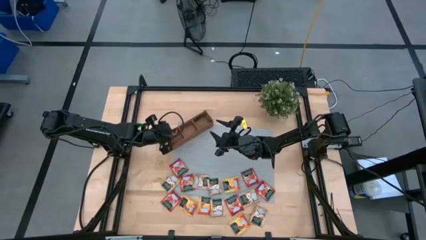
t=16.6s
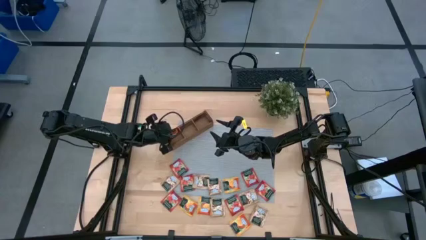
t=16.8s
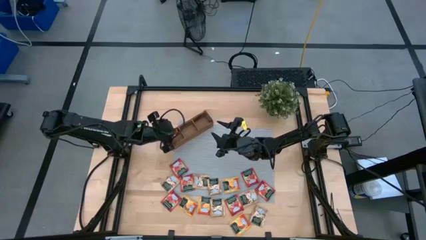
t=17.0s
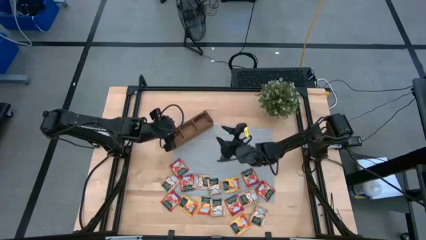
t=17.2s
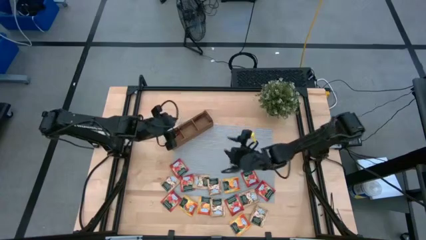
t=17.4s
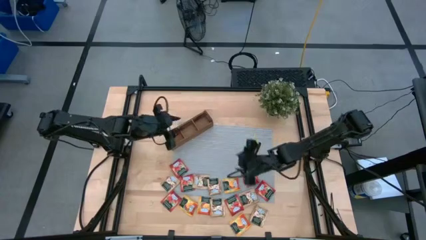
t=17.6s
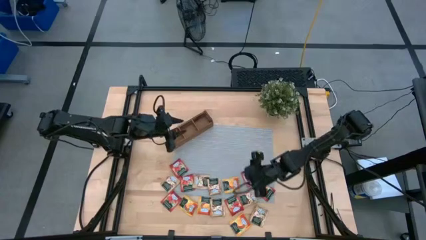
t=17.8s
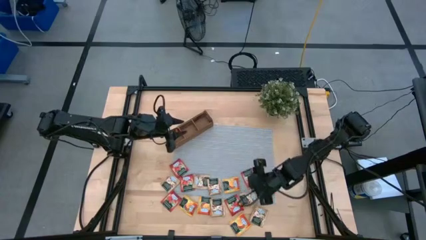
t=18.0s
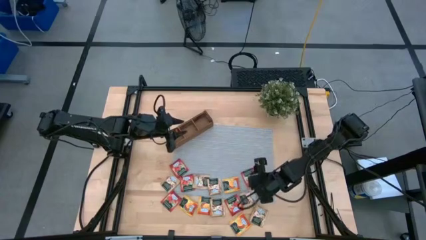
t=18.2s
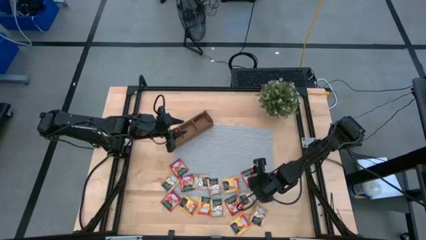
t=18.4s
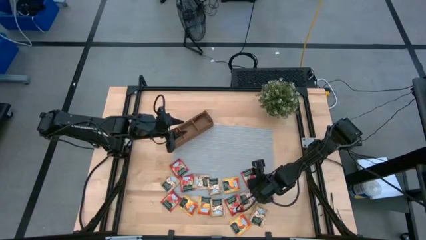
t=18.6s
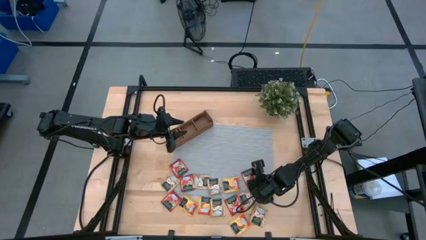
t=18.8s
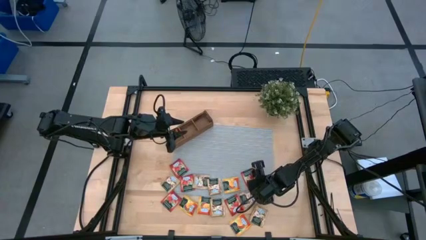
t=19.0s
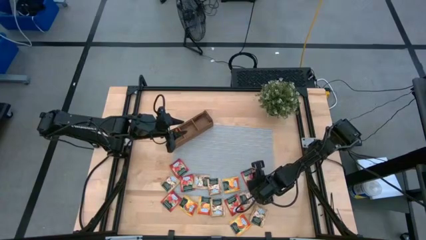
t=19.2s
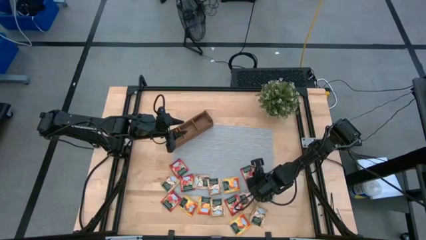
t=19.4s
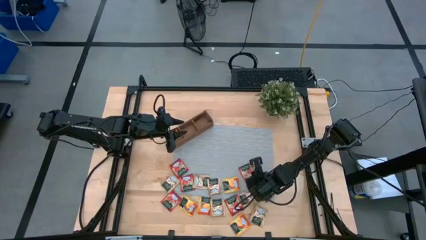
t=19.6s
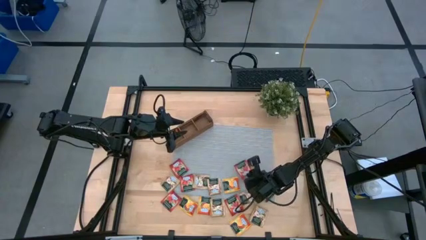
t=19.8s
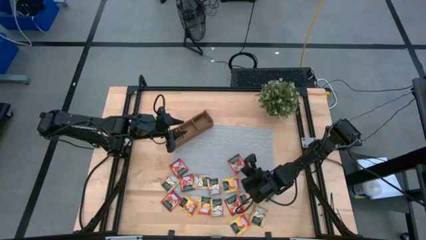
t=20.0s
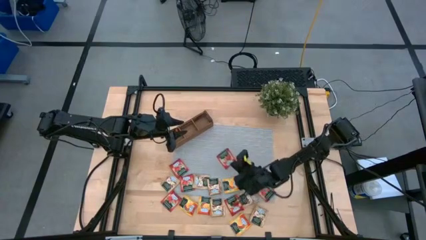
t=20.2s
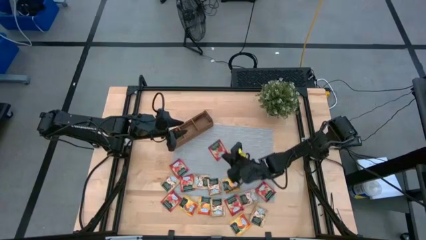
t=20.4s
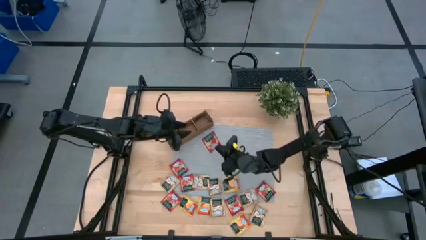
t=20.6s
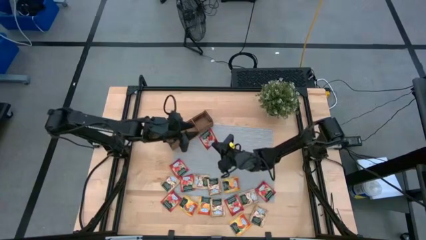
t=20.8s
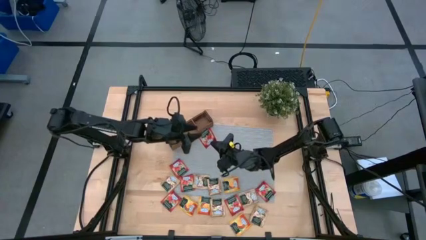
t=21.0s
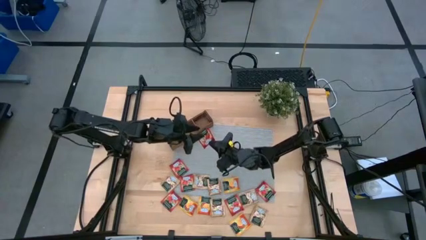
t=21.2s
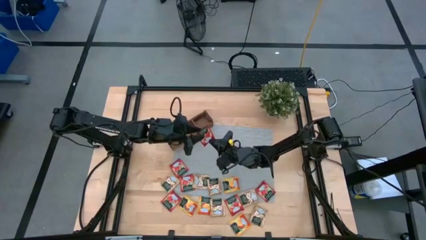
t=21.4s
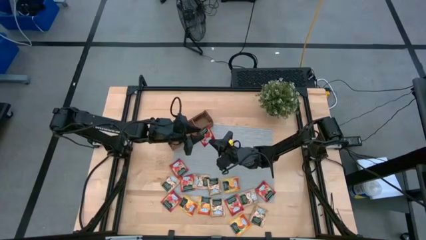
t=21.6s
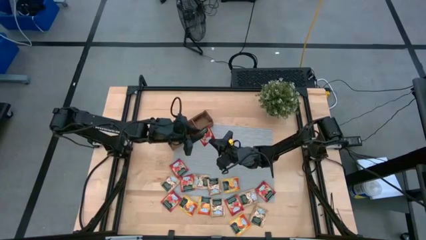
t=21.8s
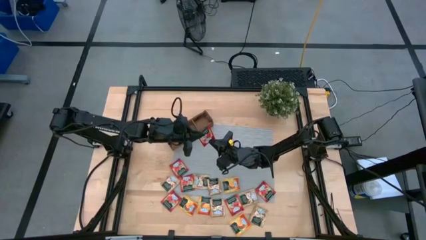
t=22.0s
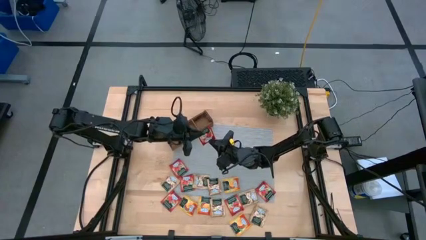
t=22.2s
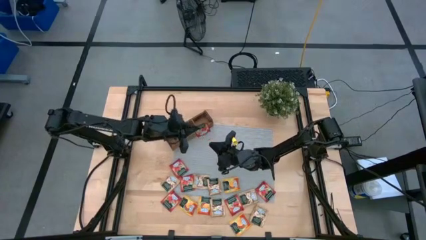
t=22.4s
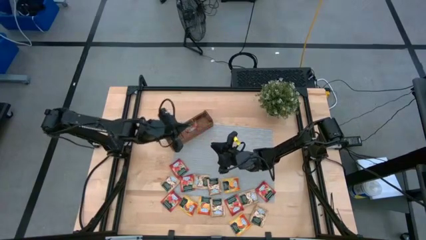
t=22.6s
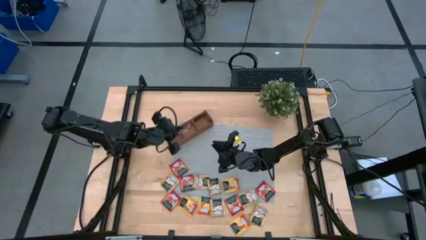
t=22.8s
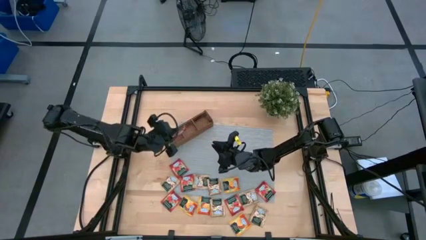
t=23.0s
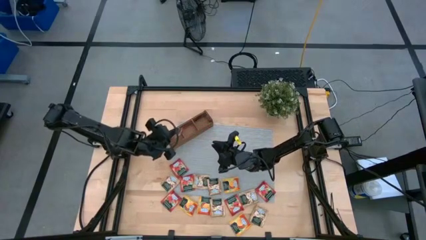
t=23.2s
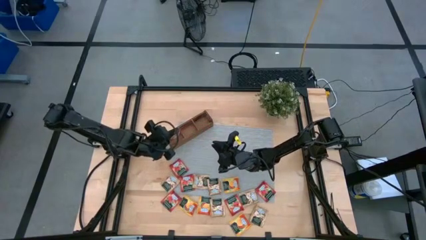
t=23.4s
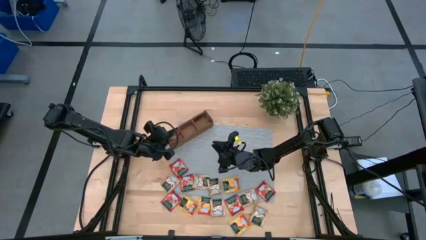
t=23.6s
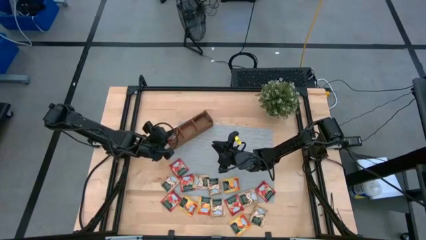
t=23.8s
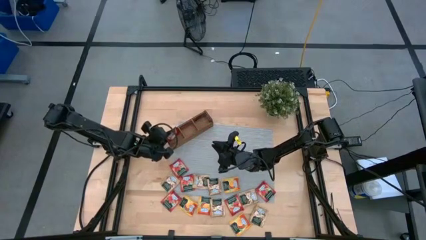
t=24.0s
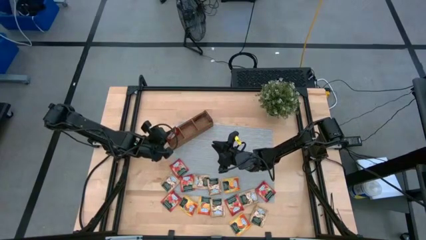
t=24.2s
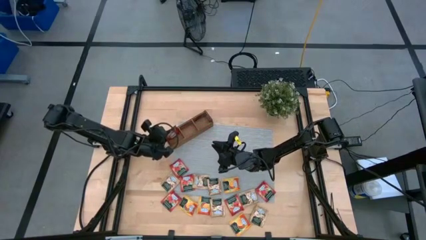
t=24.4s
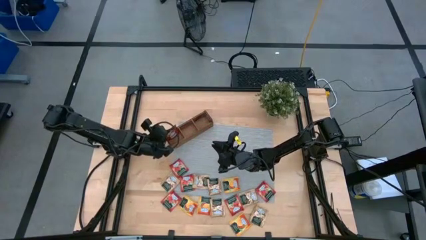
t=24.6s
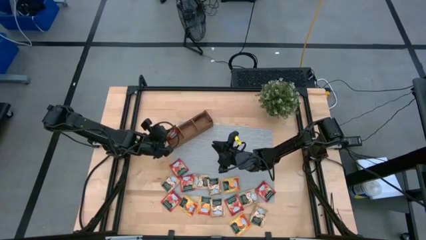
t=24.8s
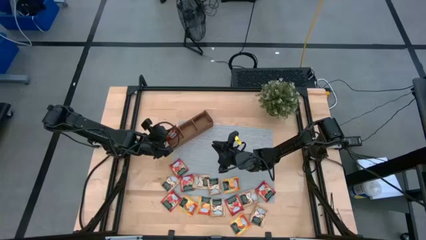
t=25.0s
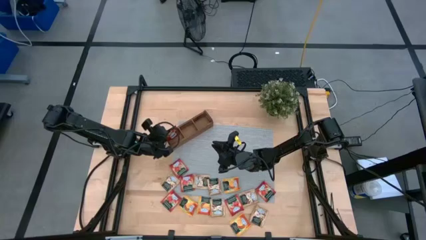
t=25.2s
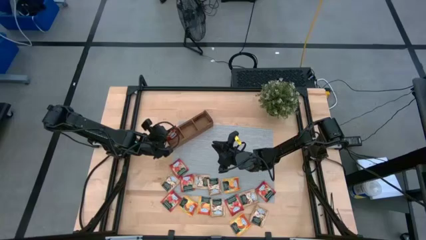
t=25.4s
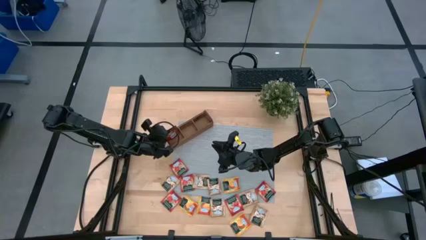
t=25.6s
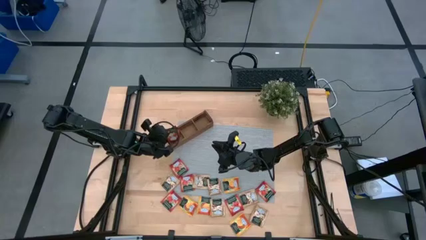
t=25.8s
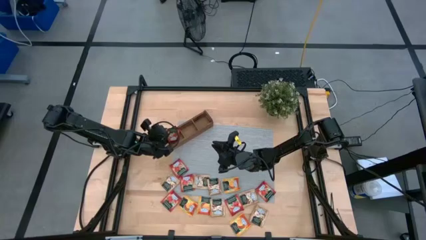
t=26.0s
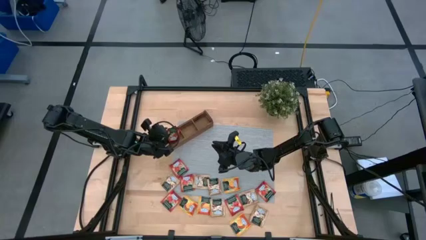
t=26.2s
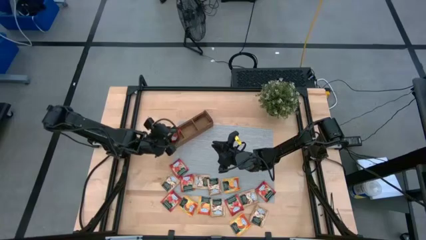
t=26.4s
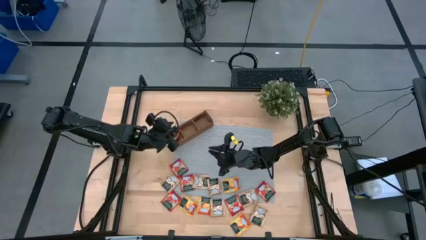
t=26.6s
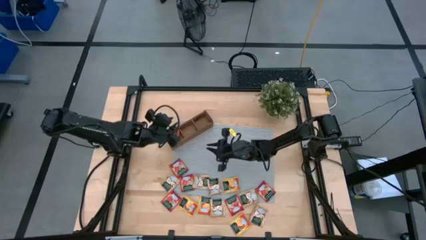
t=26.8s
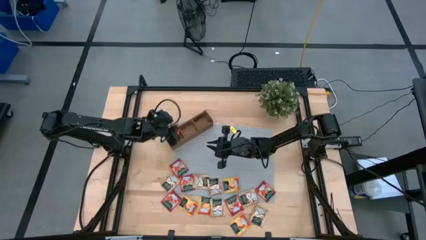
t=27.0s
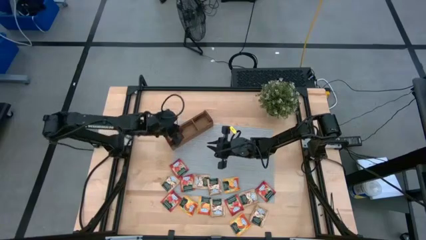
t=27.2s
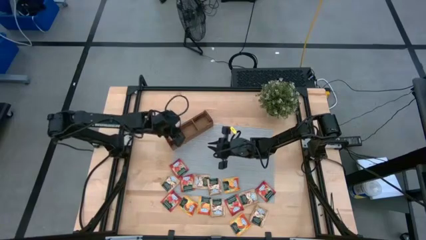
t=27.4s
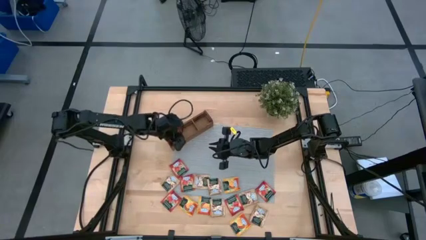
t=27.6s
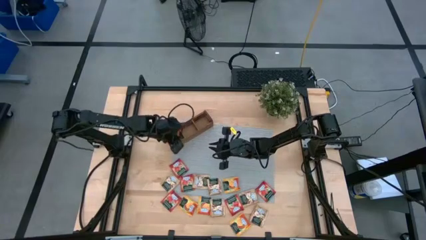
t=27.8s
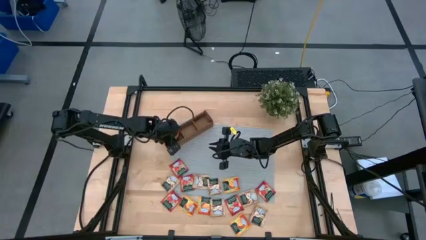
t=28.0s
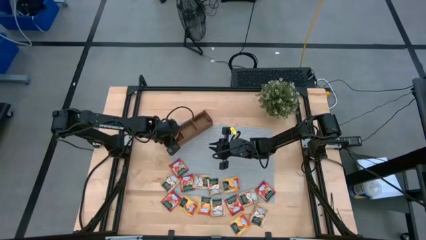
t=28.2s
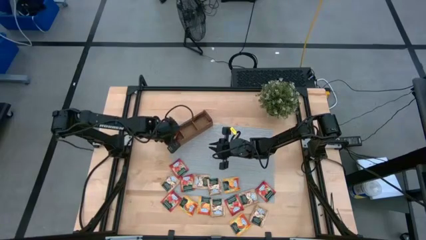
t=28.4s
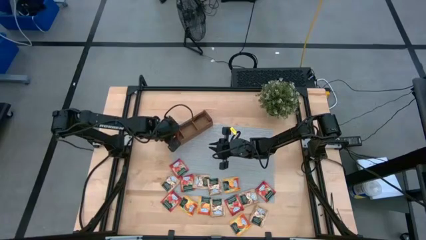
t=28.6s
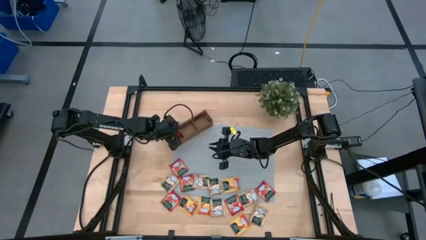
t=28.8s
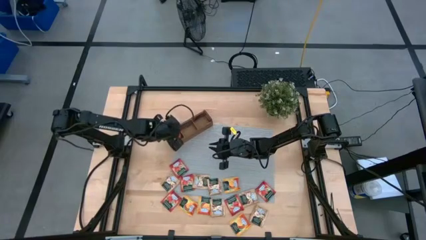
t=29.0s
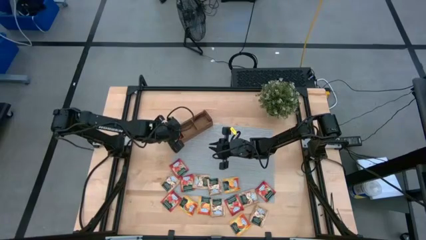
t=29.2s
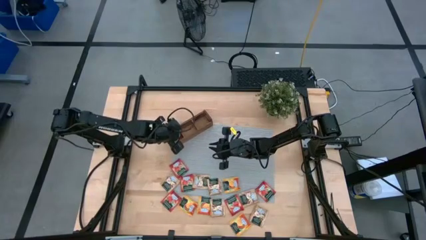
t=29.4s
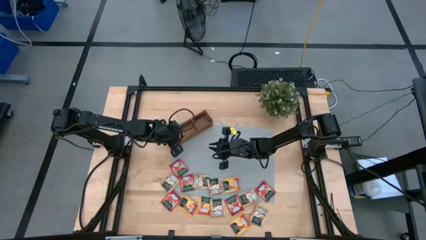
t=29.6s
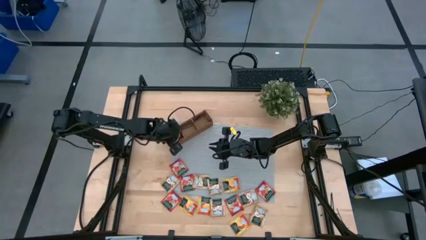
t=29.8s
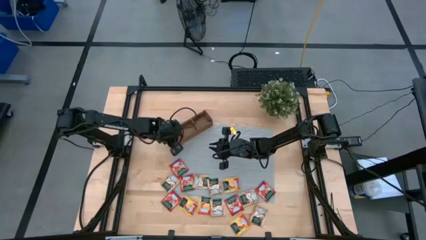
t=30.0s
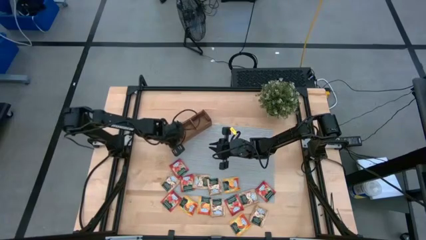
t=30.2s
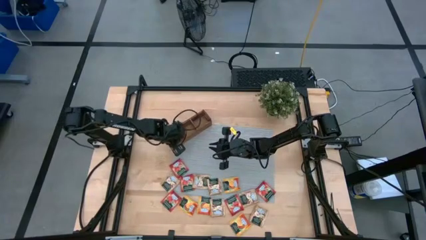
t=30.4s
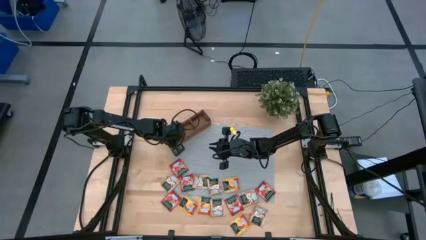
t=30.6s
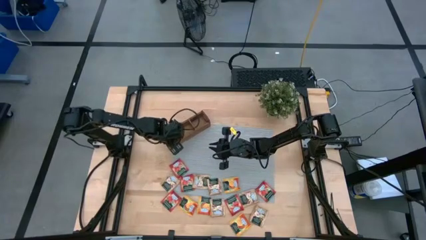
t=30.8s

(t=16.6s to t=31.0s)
Task: Pick & Place Tea
Put the red tea bag into the left section of the wooden organizer
